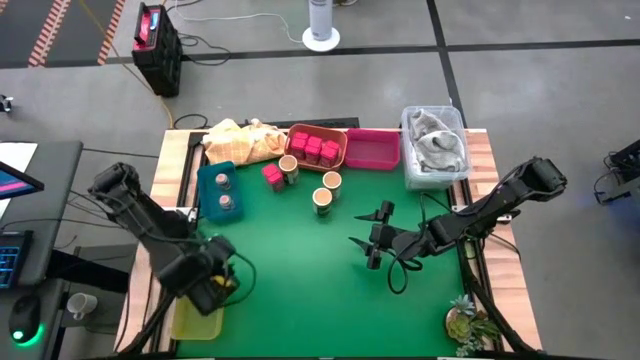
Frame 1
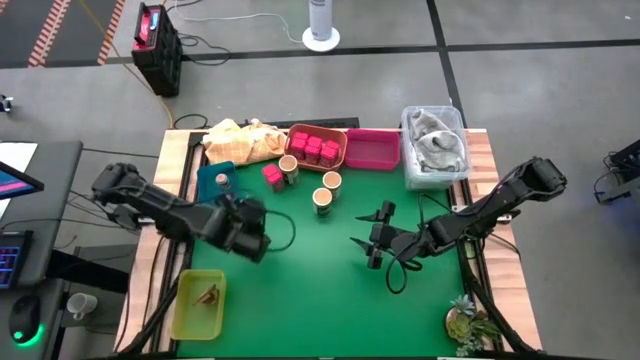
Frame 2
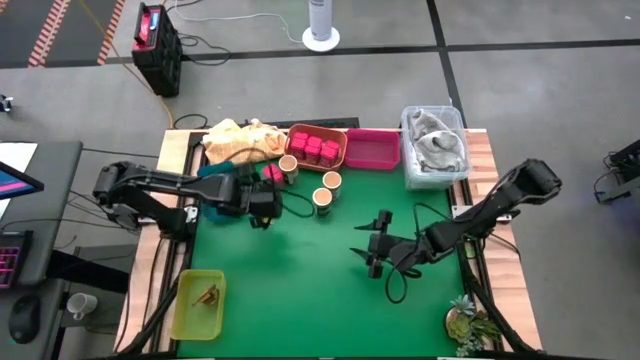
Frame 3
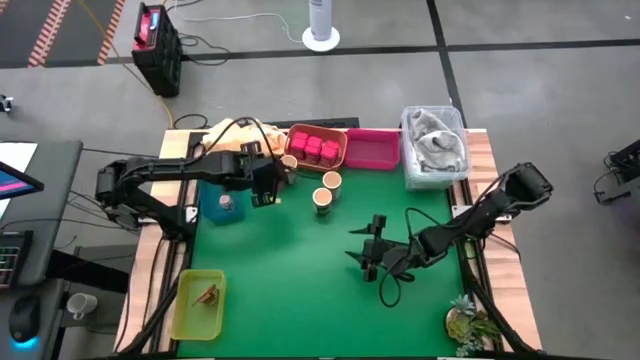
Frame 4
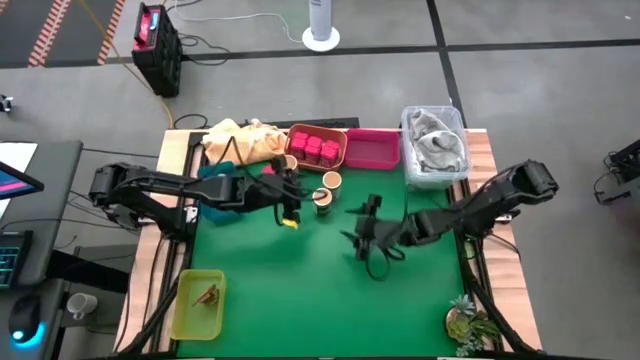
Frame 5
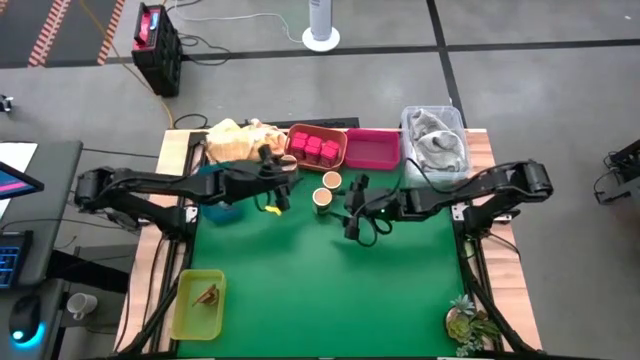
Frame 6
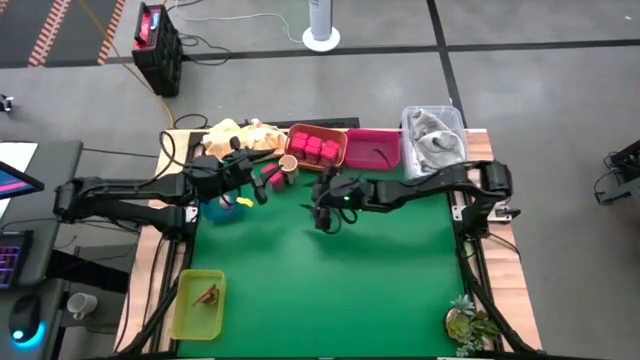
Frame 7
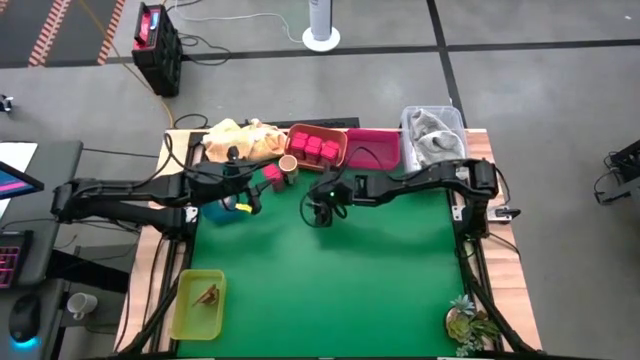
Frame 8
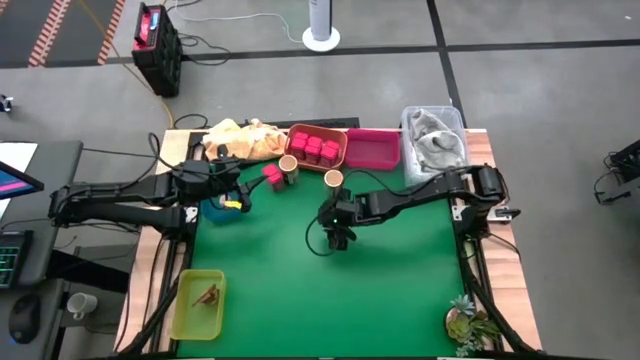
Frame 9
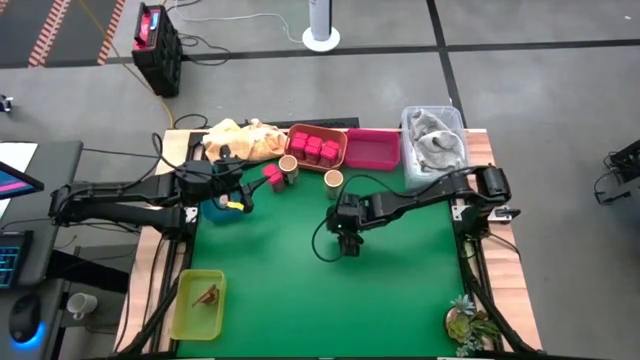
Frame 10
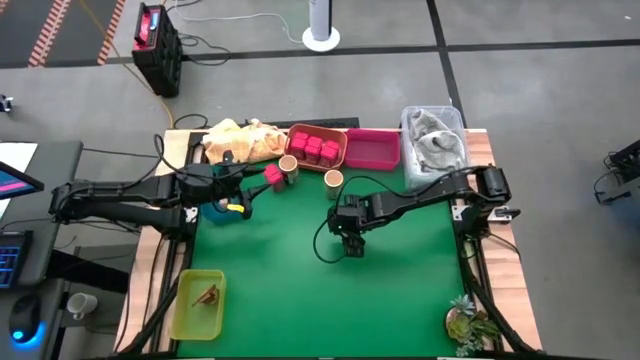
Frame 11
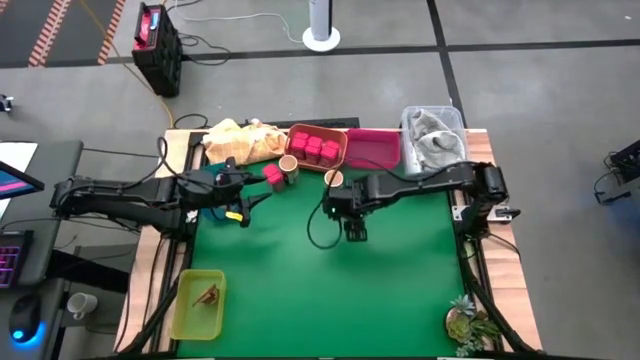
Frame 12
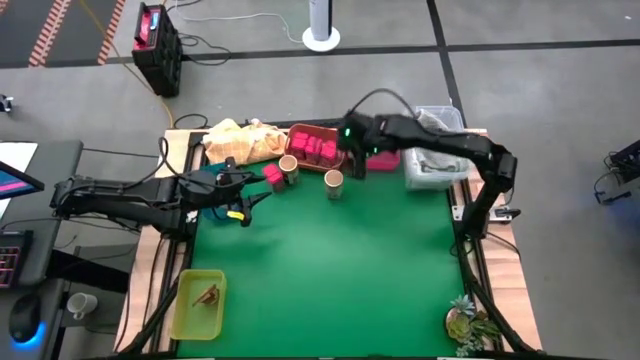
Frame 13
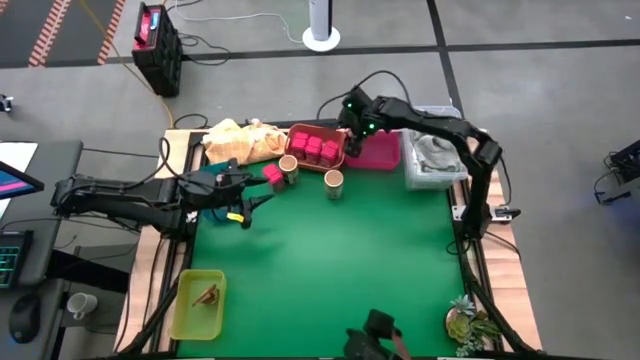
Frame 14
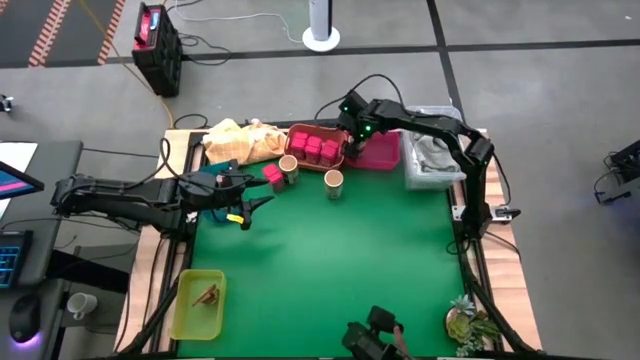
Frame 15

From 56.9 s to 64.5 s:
Task: Sort spices by type
Put the bottom big brown seasoning bottle into the red bin

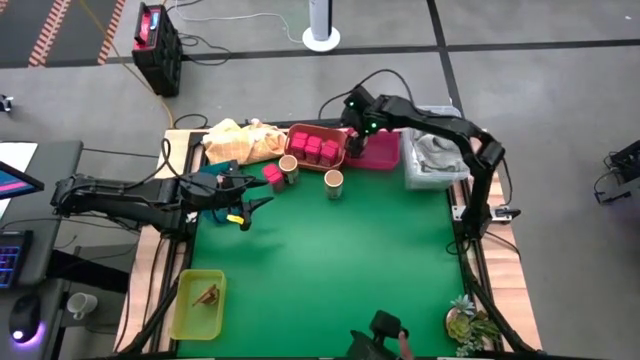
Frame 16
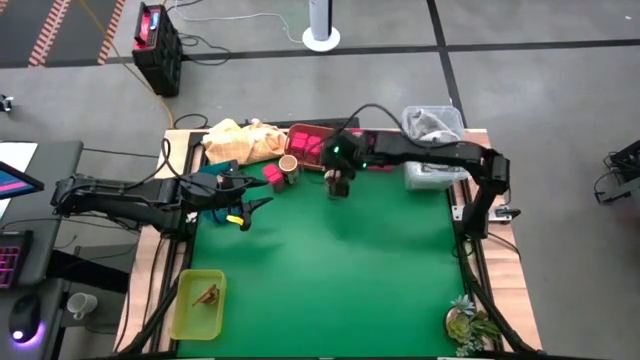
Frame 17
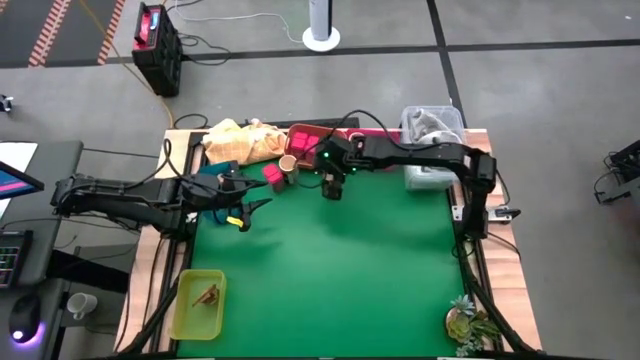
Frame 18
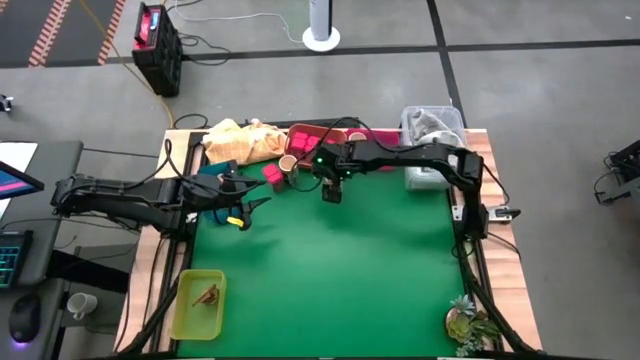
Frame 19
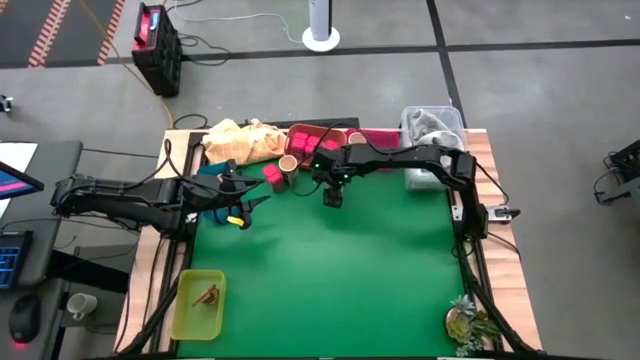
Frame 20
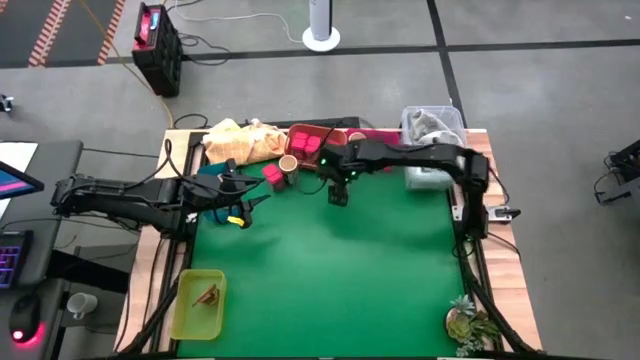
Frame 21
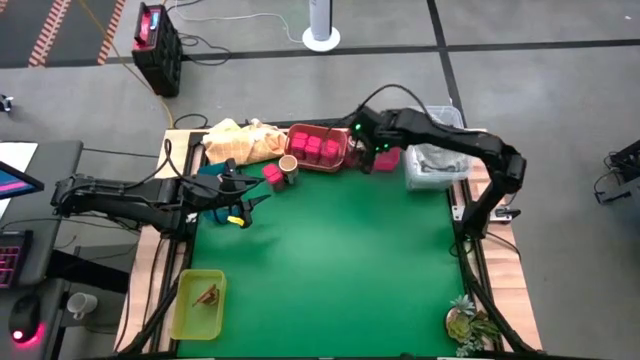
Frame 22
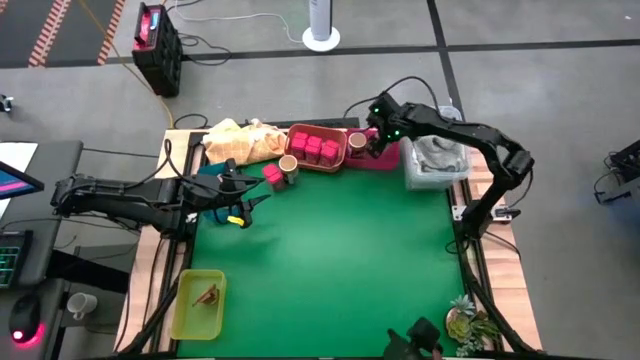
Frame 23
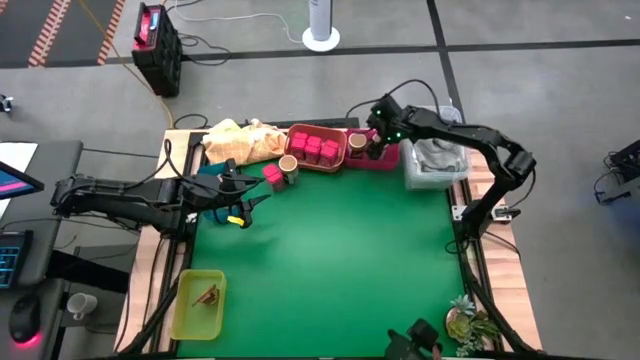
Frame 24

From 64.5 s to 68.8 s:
Put the right big brown seasoning bottle into the red bin

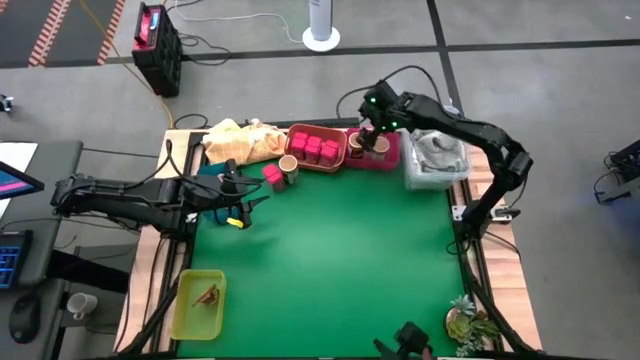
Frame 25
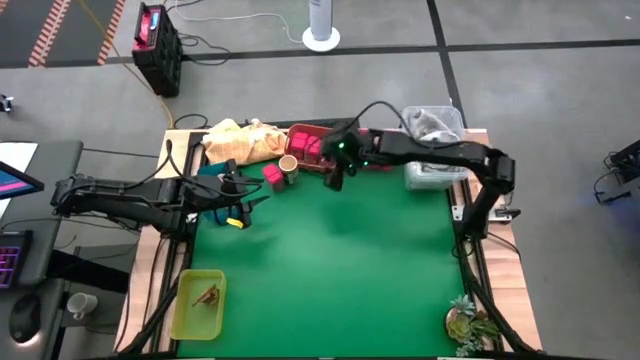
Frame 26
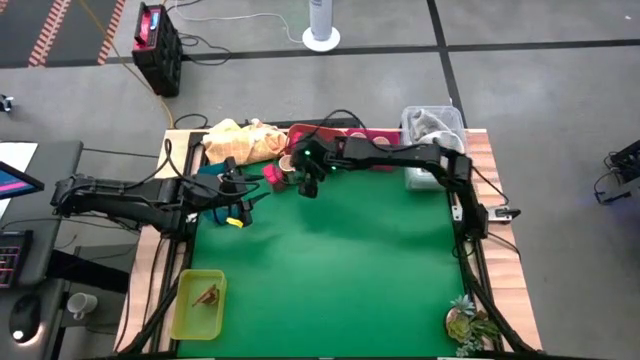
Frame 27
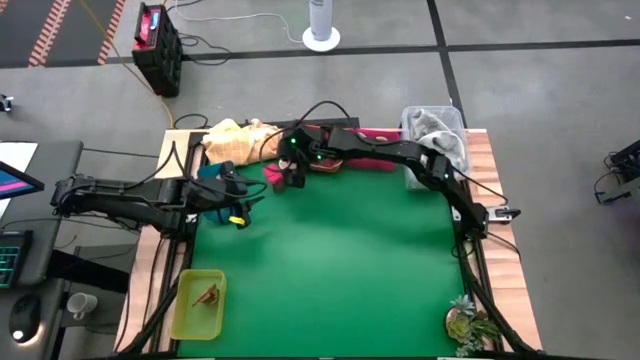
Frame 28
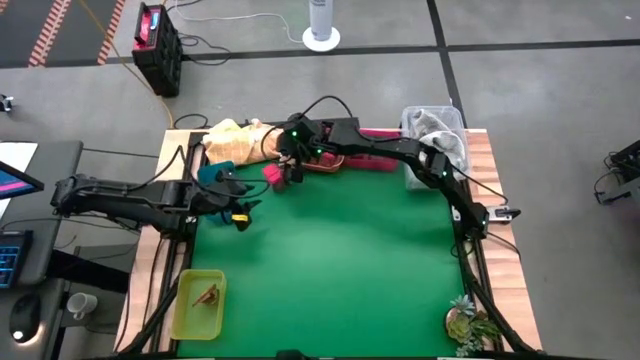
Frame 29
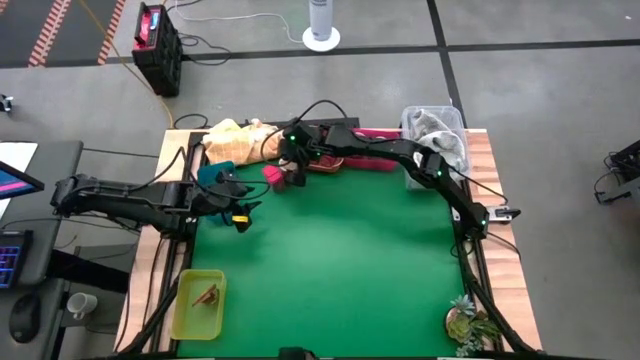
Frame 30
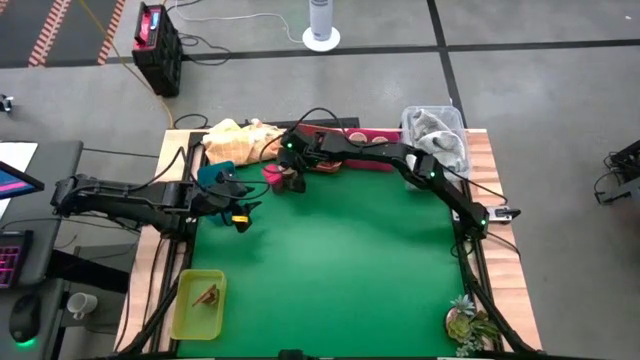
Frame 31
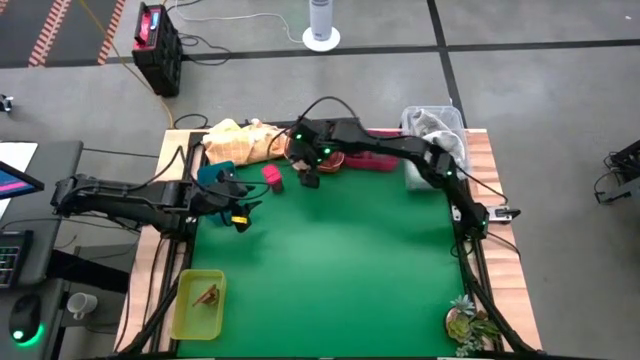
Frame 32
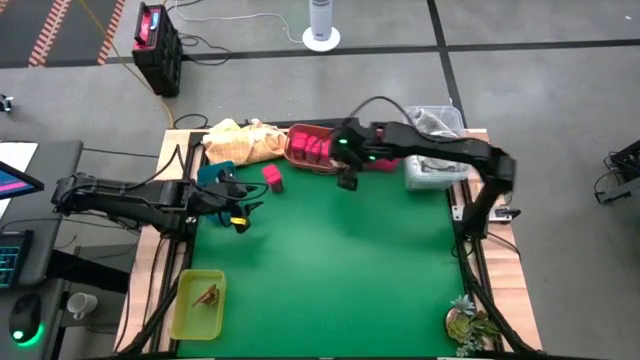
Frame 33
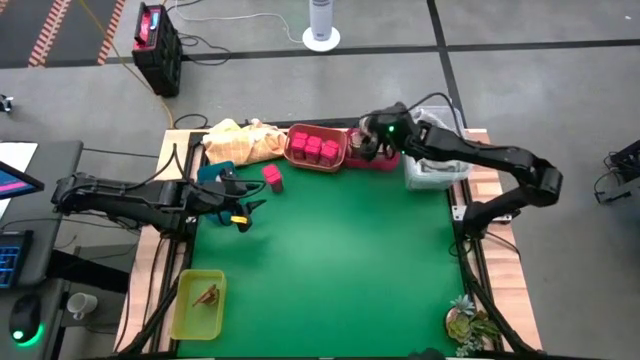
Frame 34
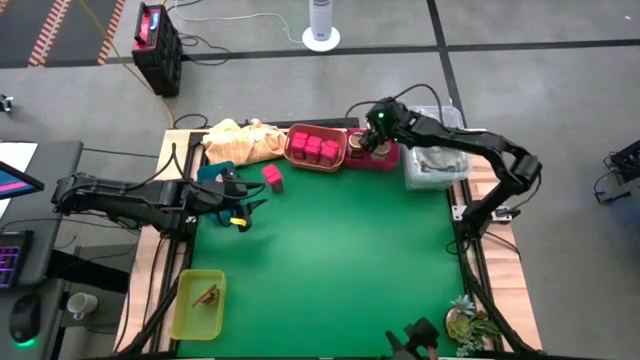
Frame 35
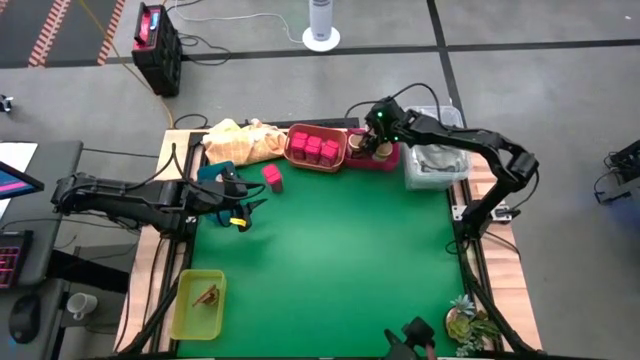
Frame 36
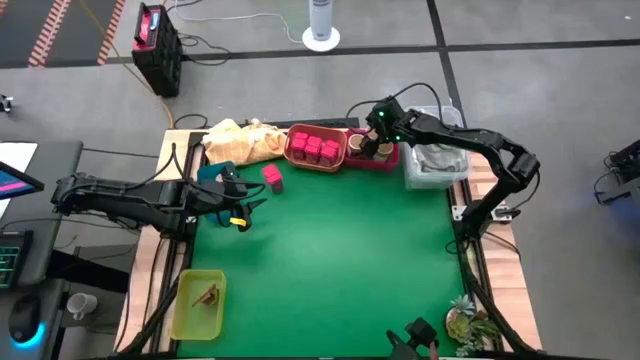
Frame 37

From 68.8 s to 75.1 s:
Put the big brown seasoning bottle into the red bin

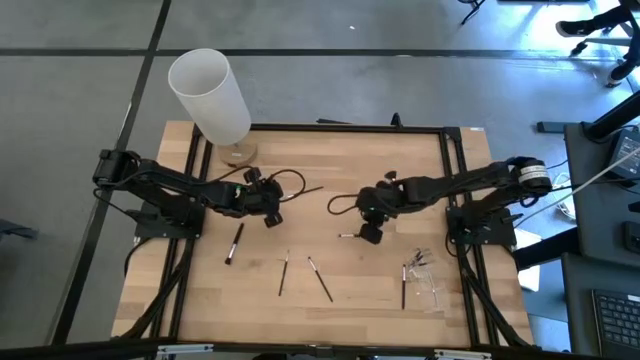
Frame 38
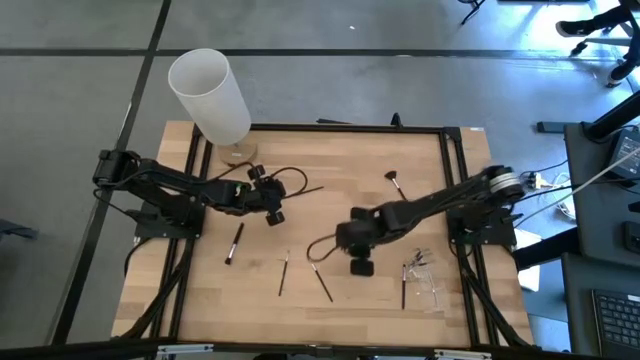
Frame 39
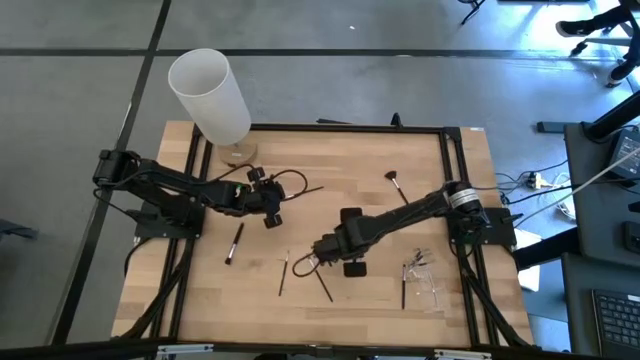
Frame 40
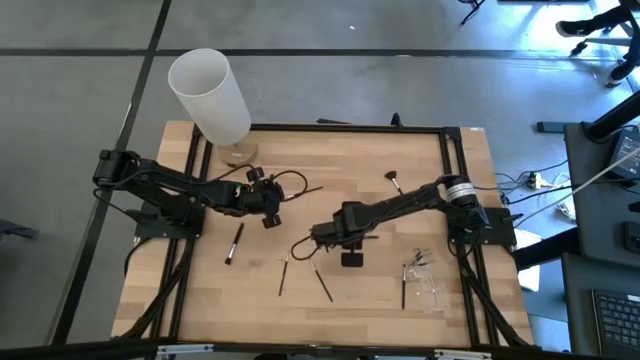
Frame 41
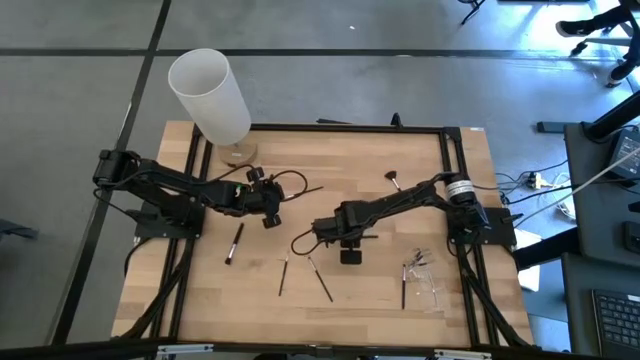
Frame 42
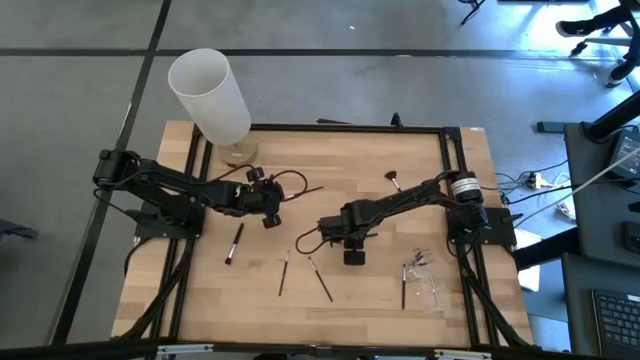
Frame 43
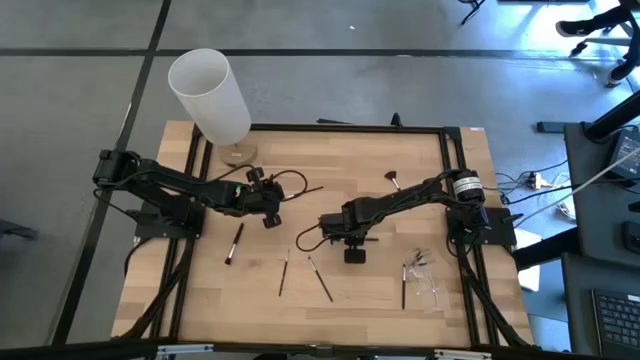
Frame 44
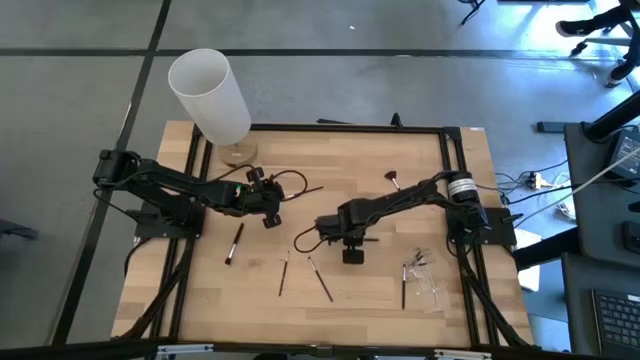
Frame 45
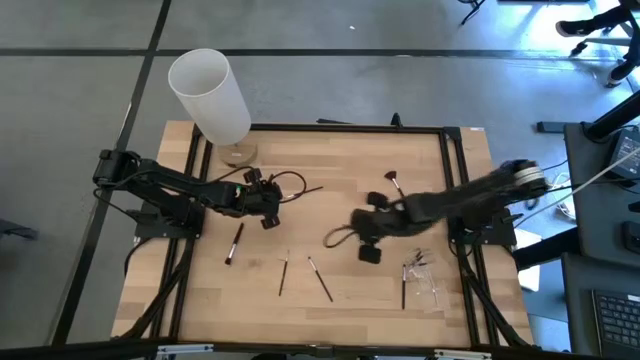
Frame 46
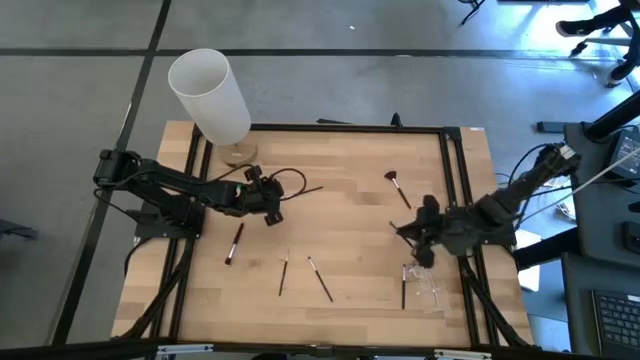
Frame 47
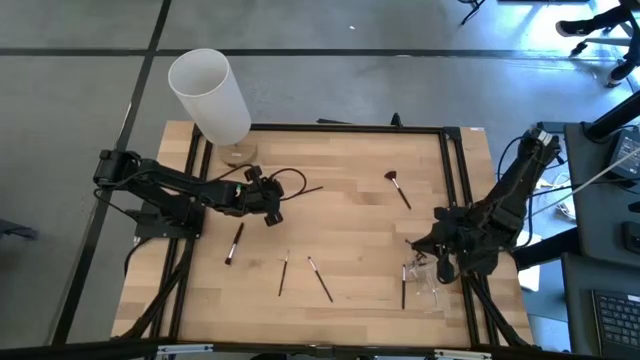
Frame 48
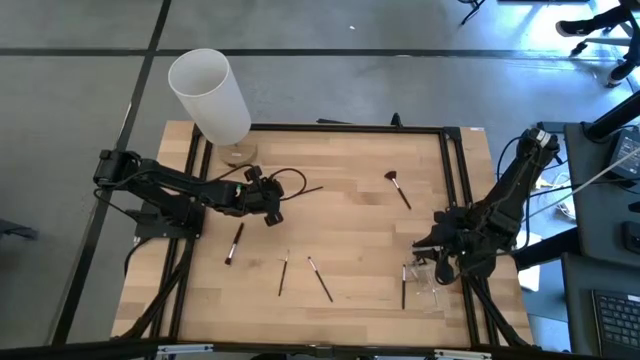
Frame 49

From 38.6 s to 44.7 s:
Task: Put items in baskets/containers
Put the black eyeshadow brush into the transparent organizer
